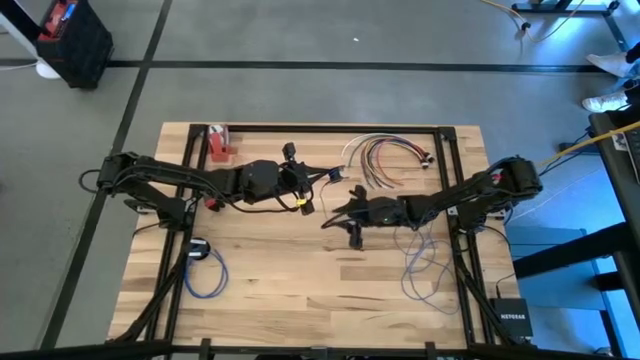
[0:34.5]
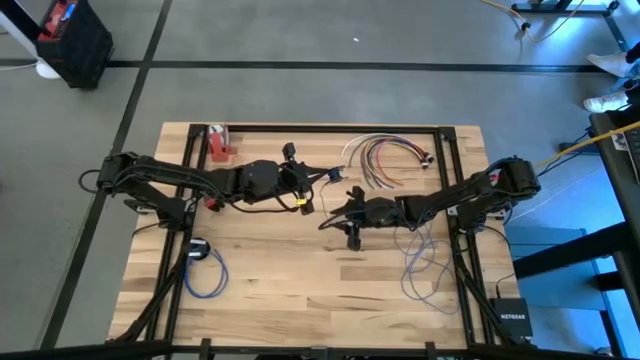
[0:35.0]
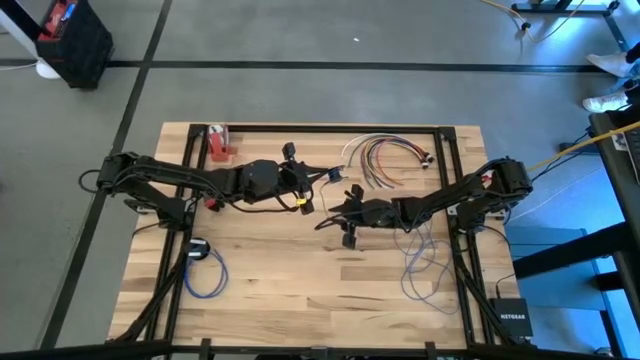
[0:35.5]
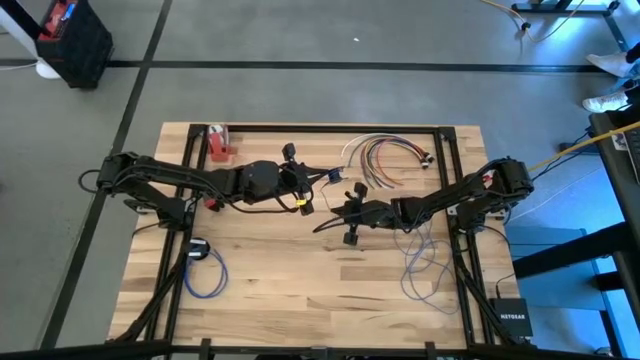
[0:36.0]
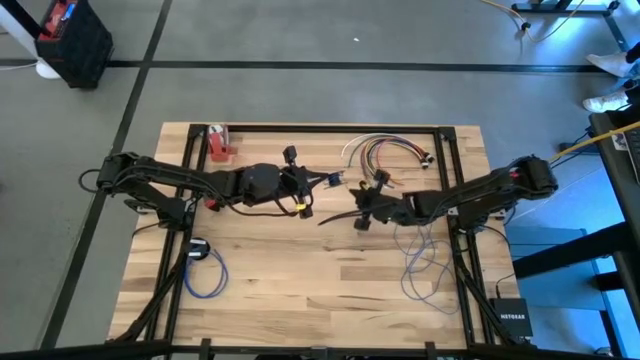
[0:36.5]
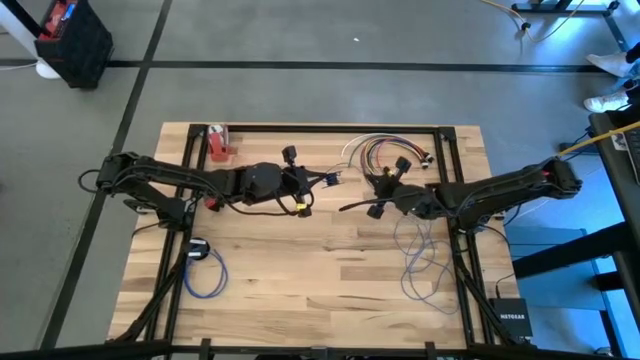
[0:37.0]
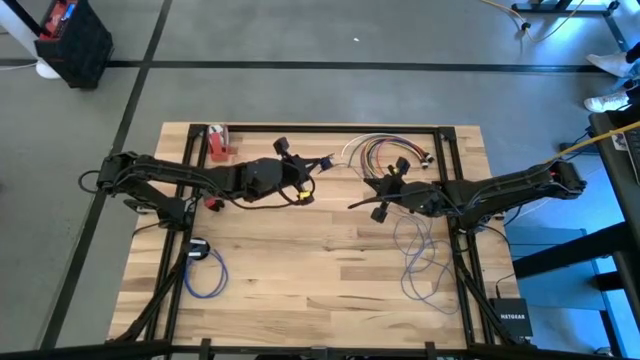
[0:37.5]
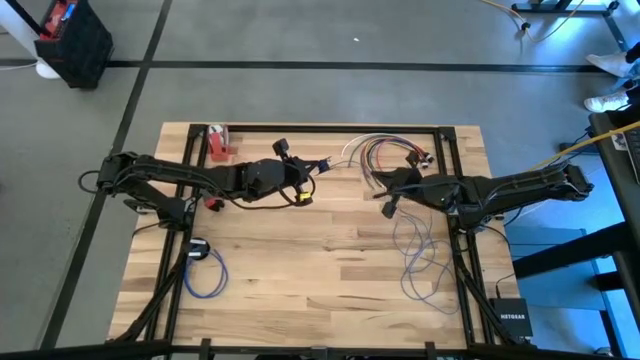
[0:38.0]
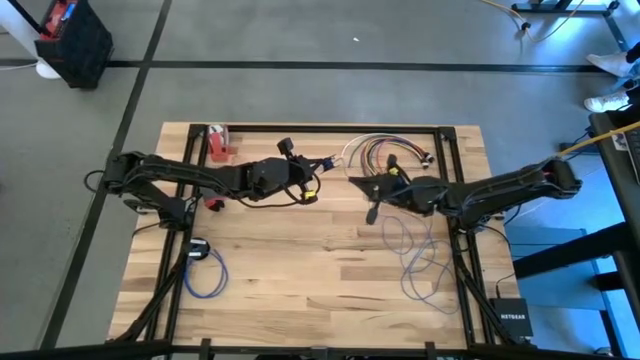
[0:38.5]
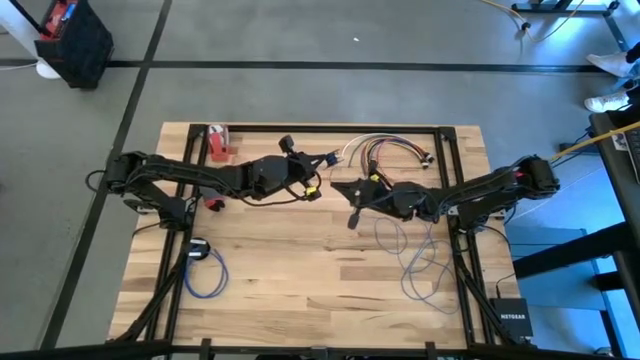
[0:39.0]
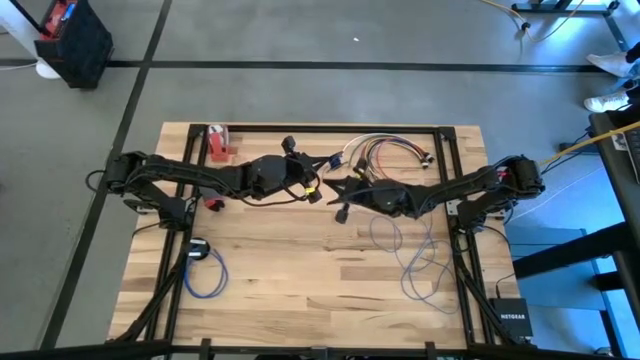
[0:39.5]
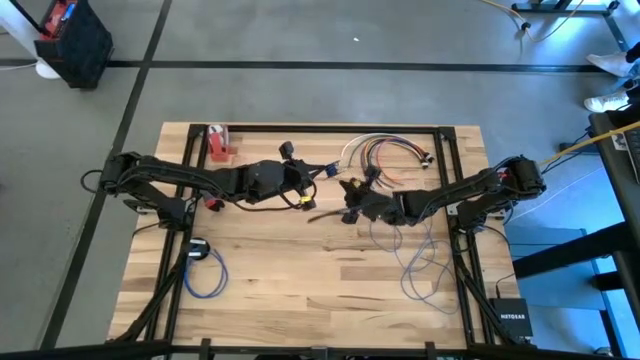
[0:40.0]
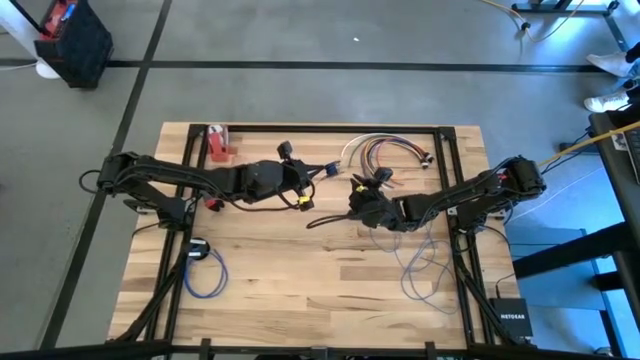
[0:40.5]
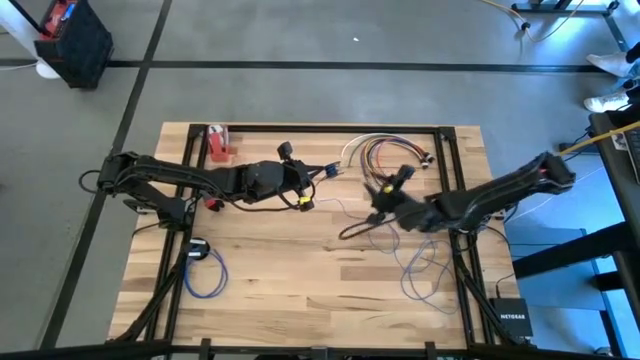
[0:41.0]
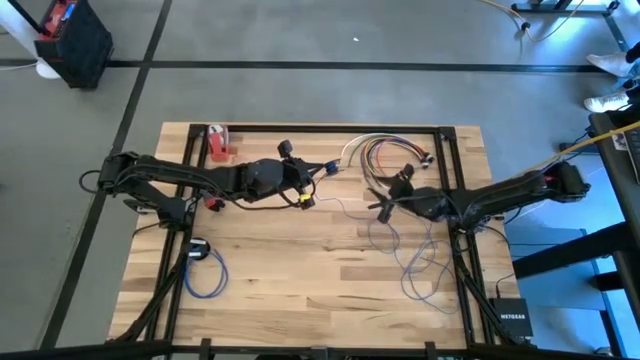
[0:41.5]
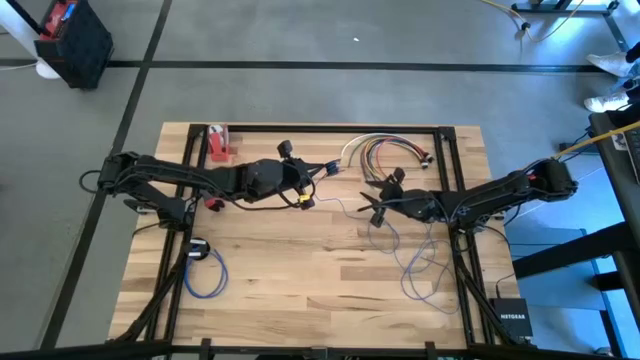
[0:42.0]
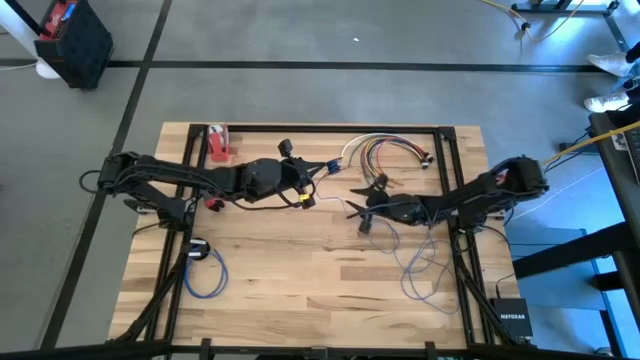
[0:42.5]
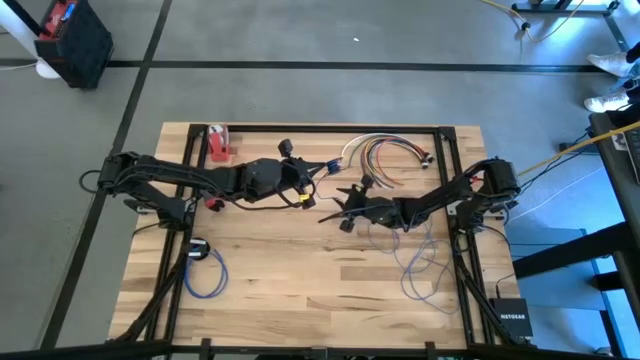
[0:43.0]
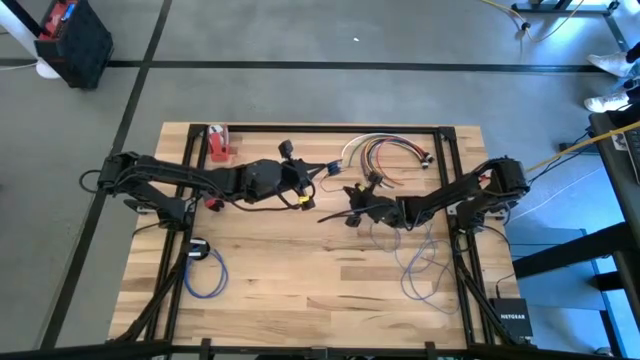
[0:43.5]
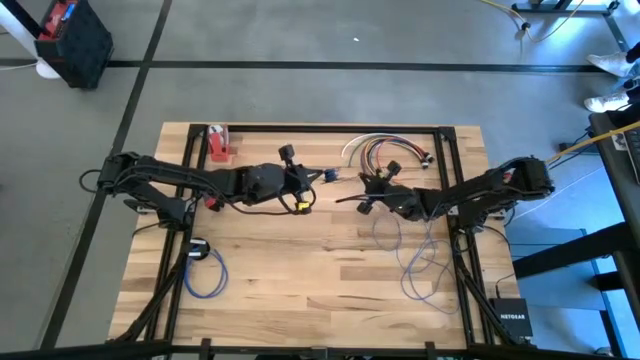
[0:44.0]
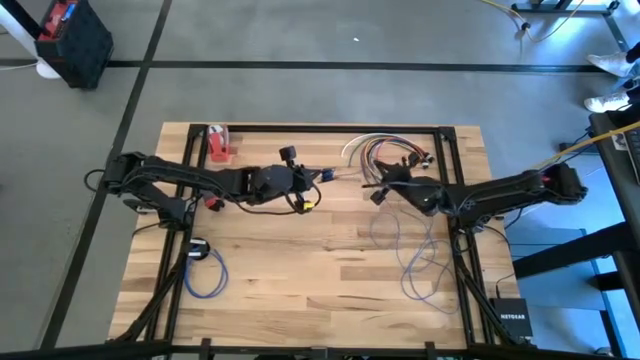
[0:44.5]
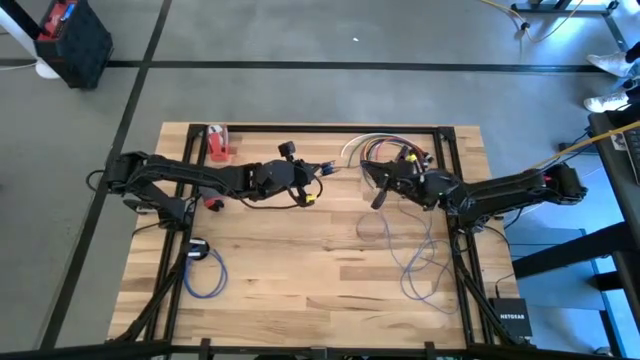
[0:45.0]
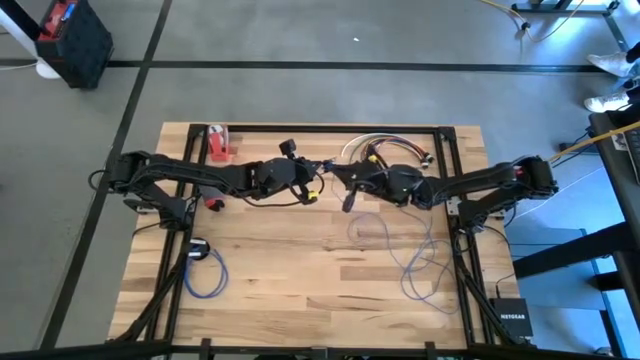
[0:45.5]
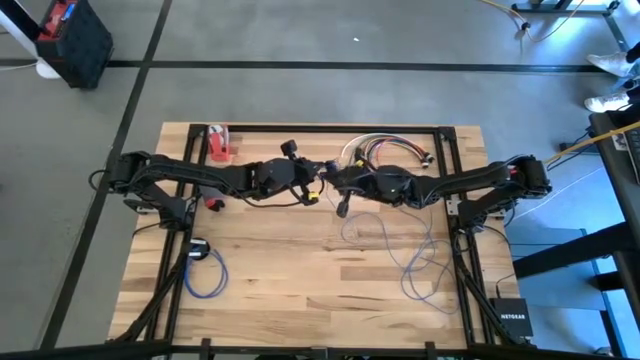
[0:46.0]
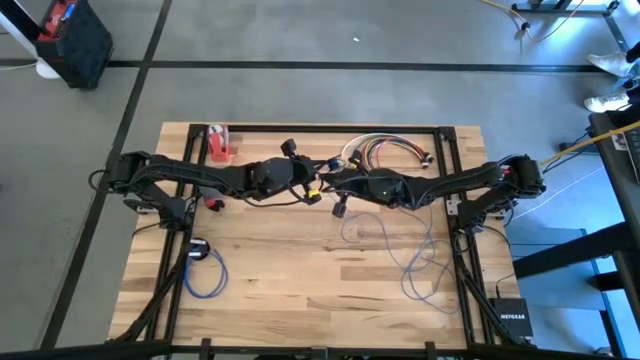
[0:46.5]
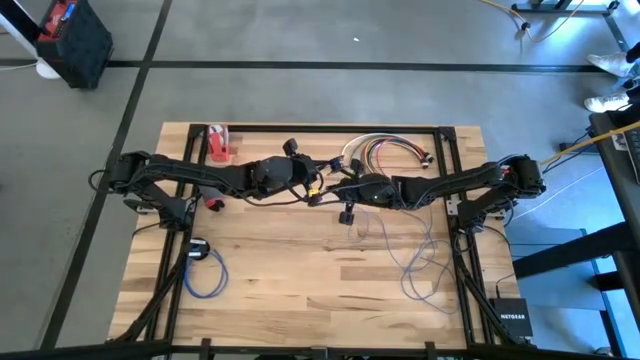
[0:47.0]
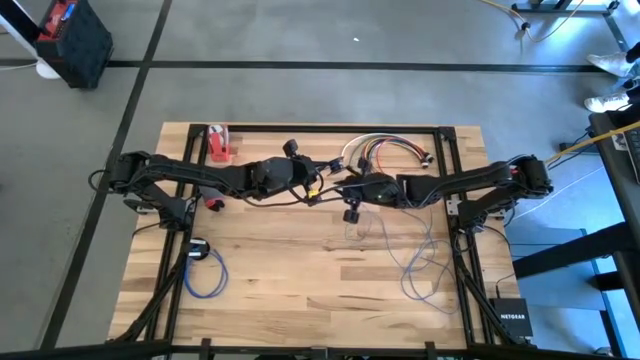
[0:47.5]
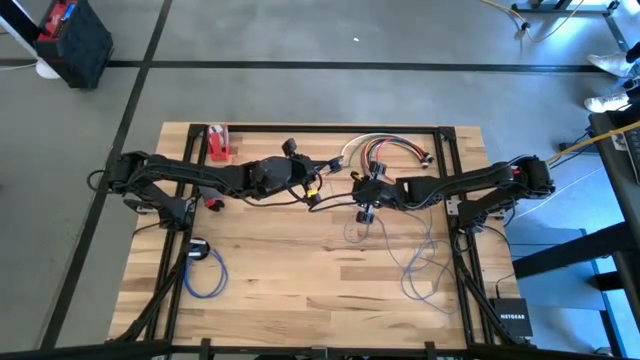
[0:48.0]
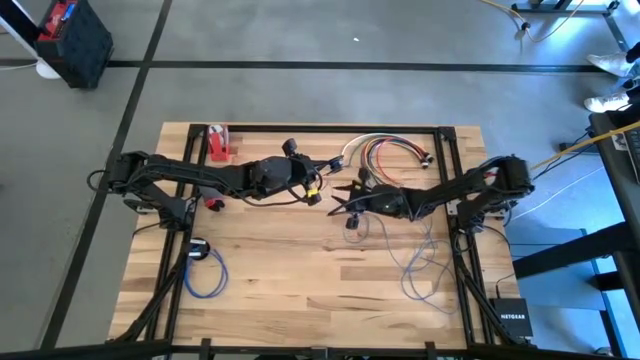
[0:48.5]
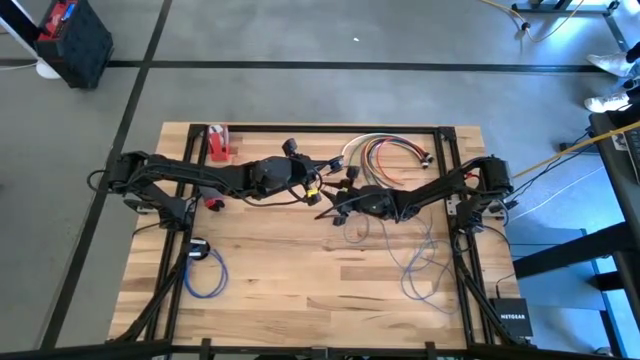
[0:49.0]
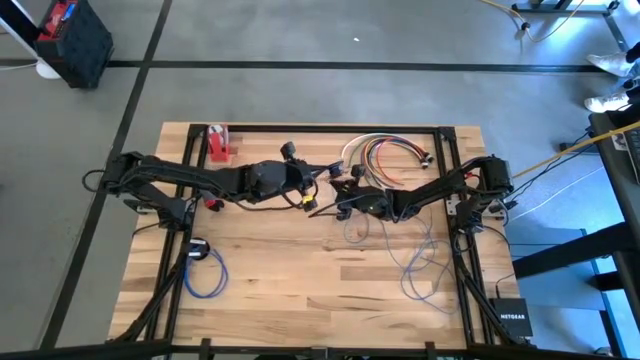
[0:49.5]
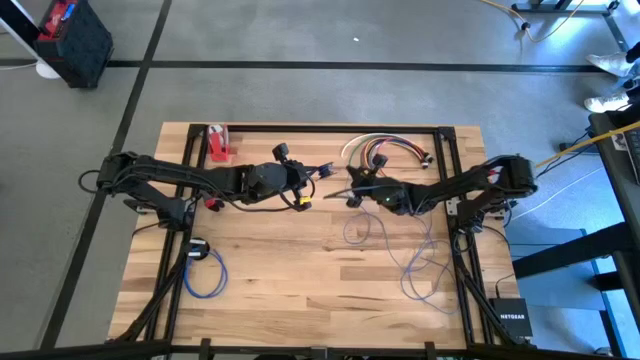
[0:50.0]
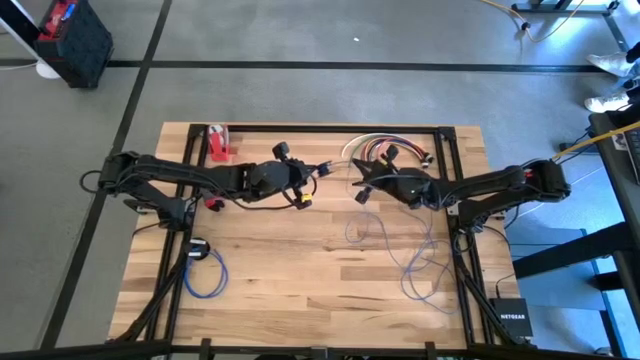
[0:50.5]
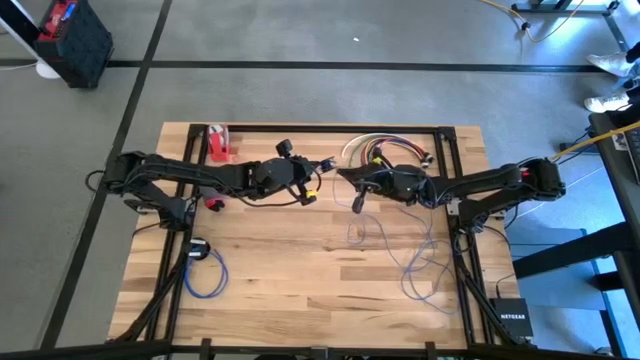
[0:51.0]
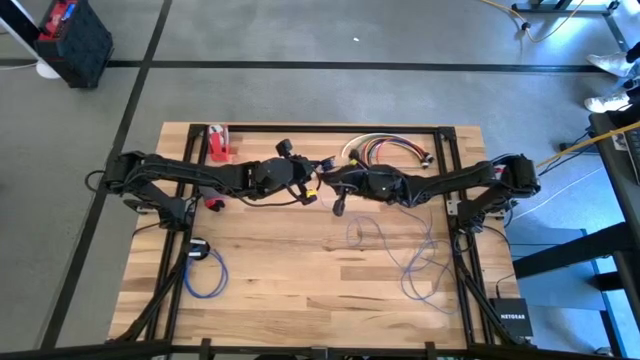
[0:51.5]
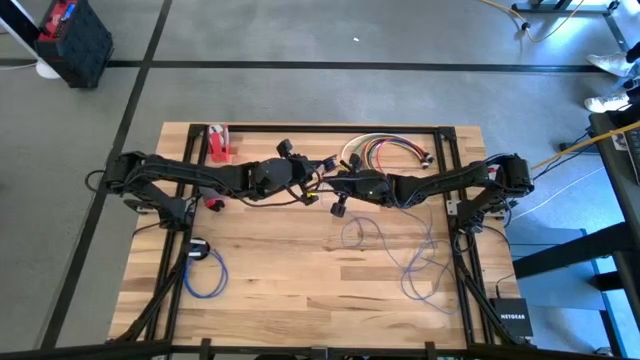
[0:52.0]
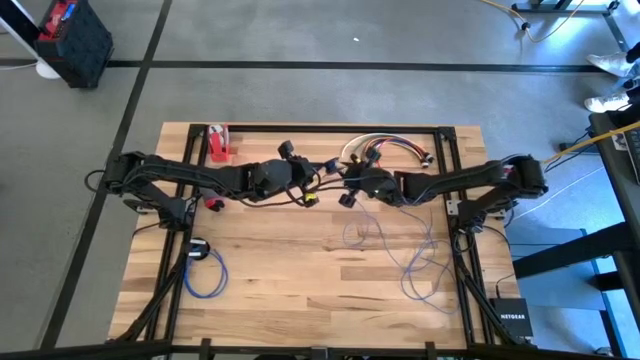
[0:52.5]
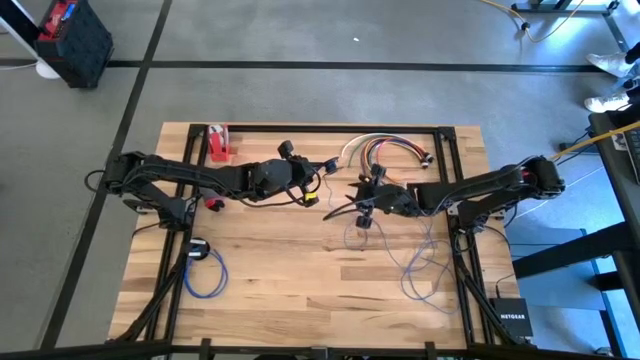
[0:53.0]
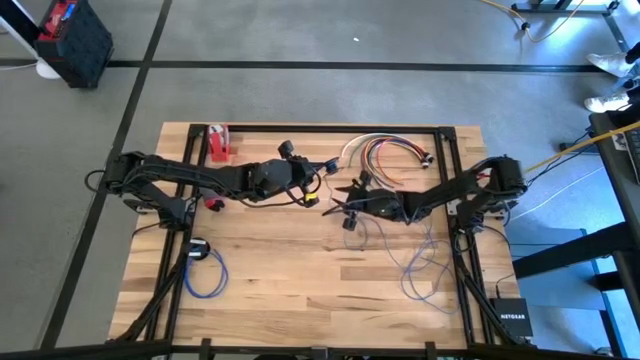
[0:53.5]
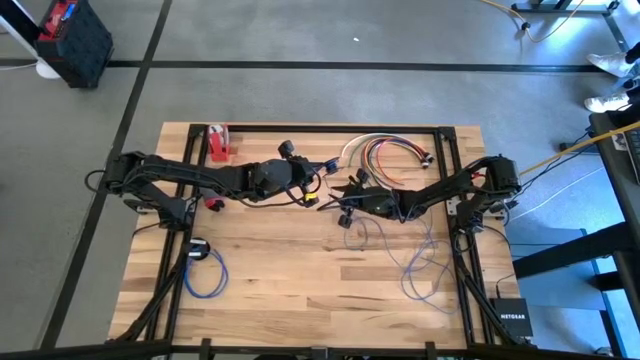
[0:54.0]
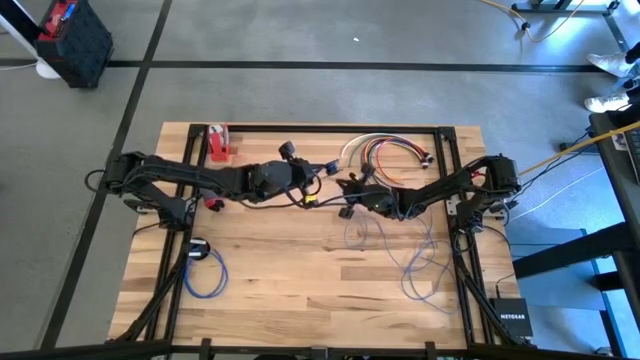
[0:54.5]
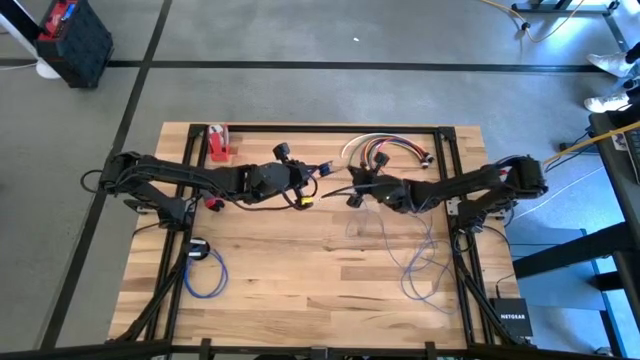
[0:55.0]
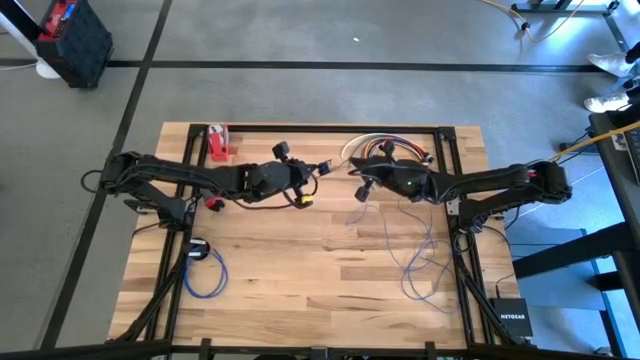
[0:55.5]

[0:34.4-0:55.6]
Task: Coil cords
Coil the blue cable wire on the black spool

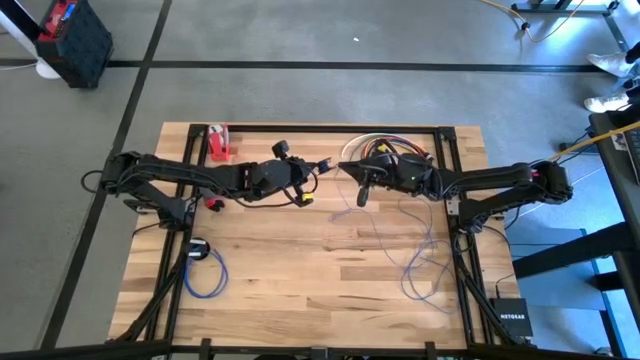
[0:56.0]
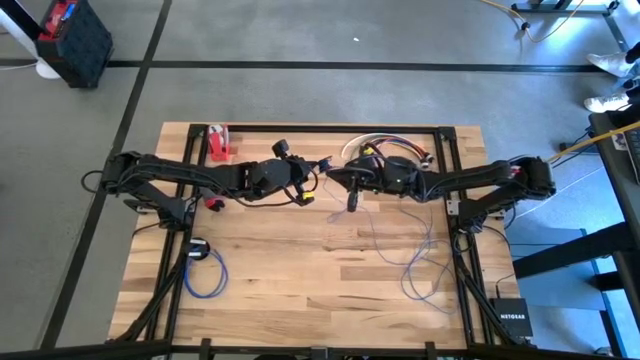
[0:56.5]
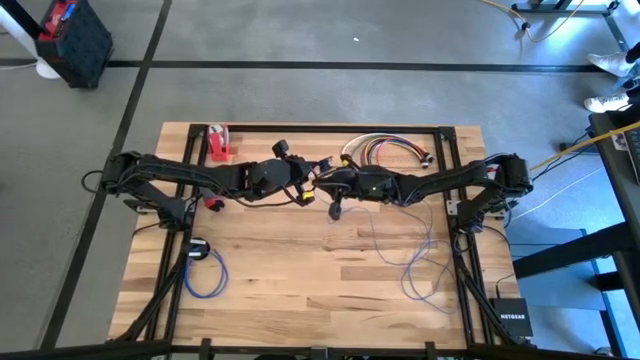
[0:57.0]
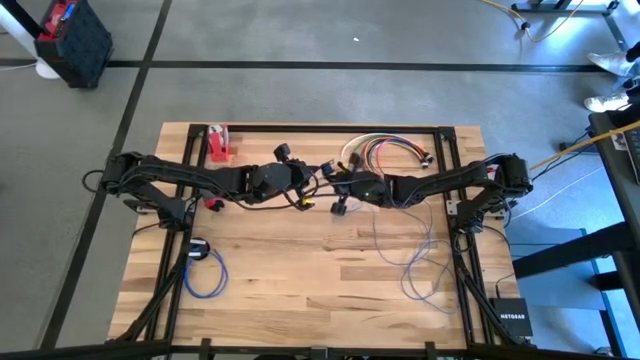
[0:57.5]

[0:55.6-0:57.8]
Coil the blue cable wire on the black spool
